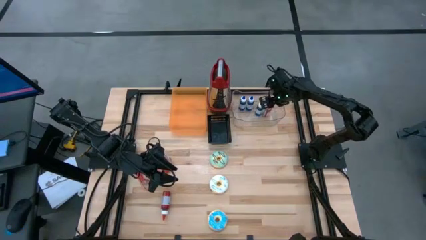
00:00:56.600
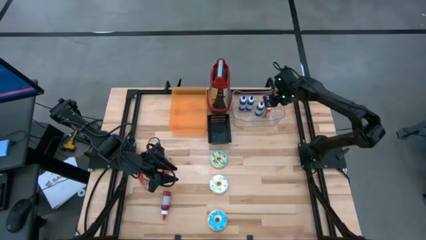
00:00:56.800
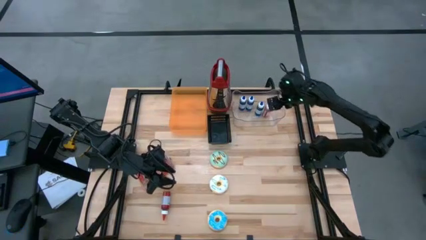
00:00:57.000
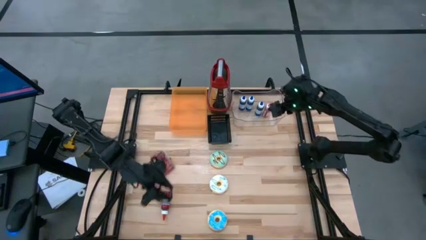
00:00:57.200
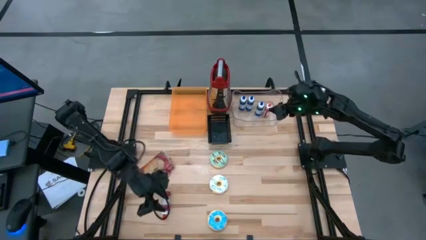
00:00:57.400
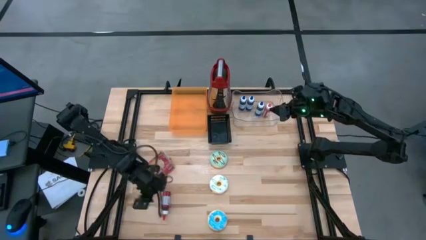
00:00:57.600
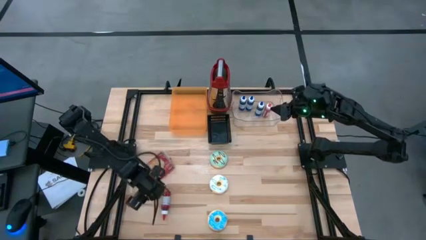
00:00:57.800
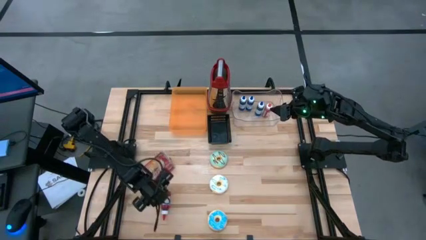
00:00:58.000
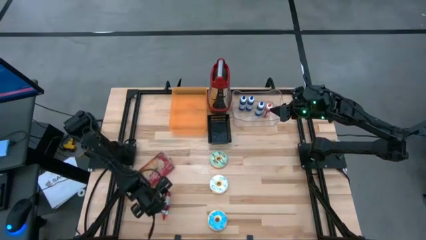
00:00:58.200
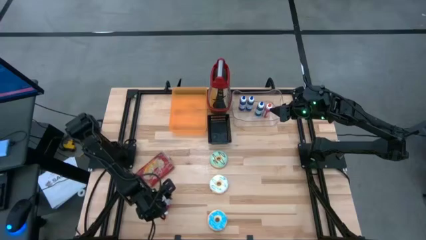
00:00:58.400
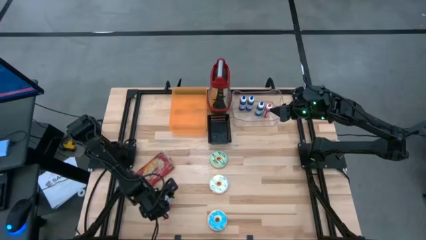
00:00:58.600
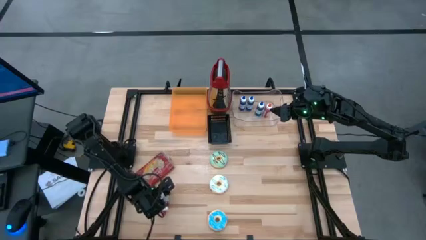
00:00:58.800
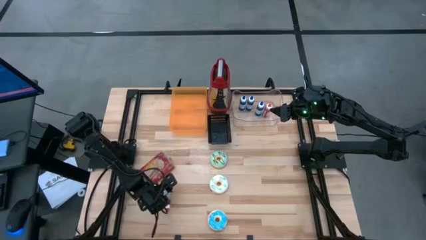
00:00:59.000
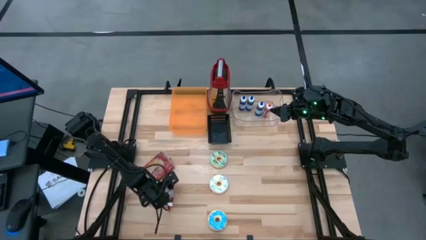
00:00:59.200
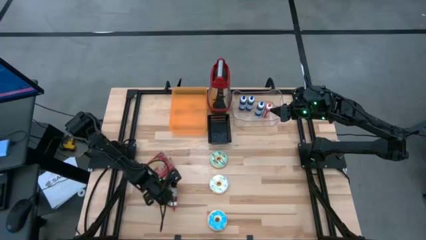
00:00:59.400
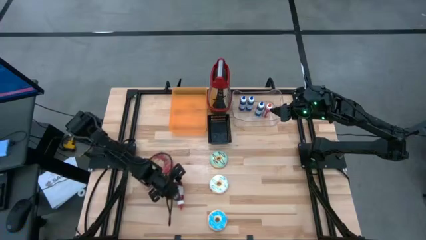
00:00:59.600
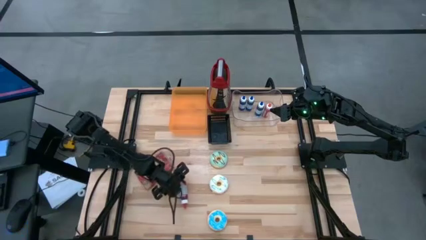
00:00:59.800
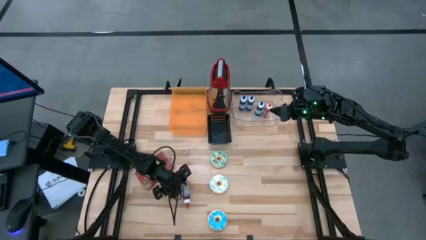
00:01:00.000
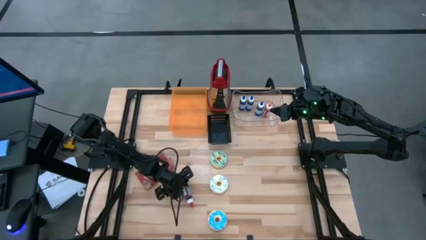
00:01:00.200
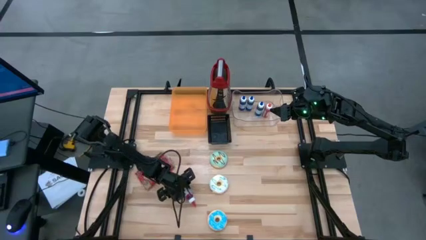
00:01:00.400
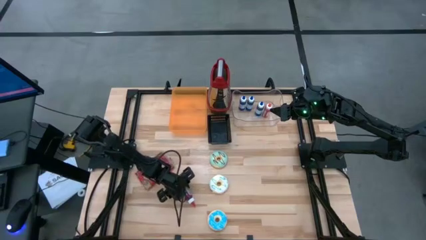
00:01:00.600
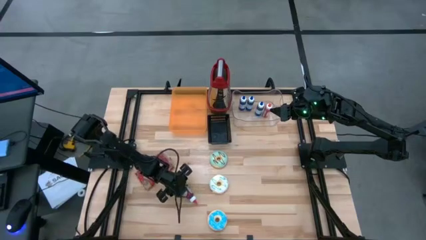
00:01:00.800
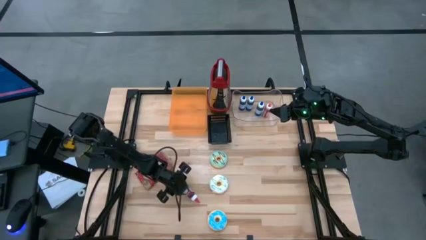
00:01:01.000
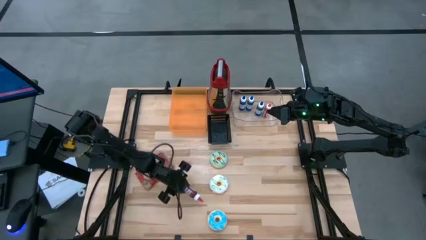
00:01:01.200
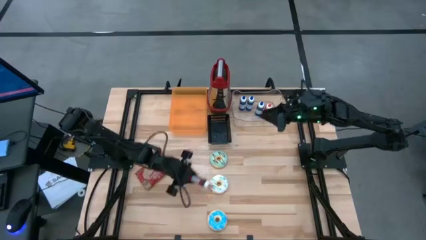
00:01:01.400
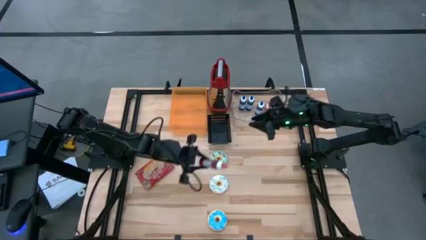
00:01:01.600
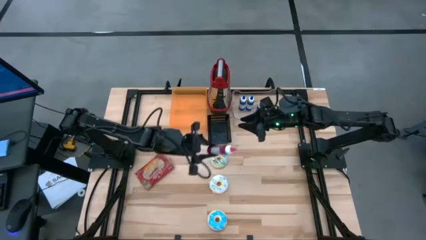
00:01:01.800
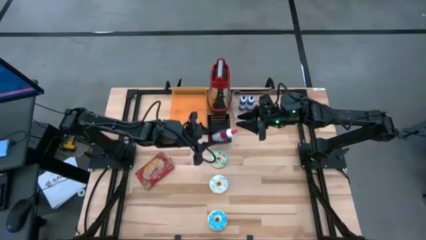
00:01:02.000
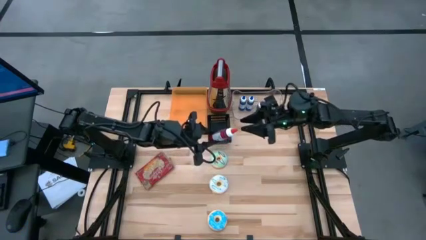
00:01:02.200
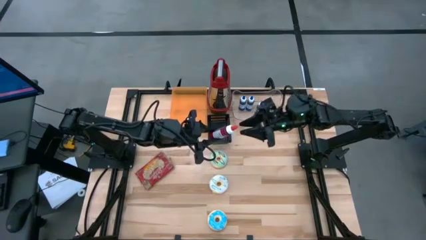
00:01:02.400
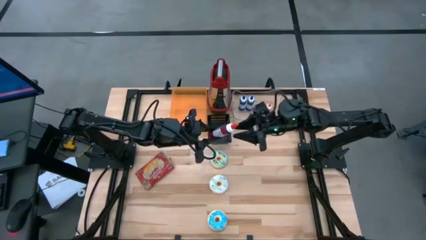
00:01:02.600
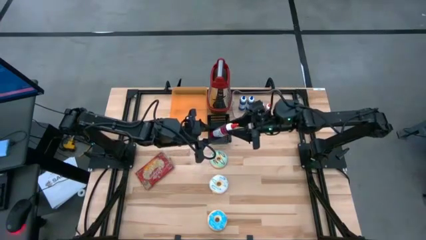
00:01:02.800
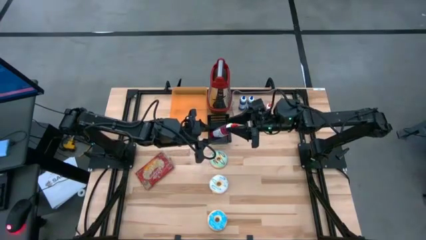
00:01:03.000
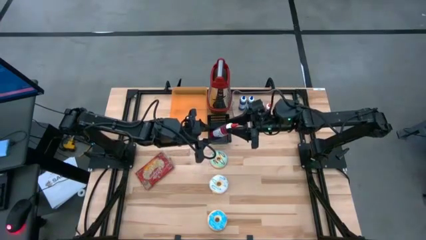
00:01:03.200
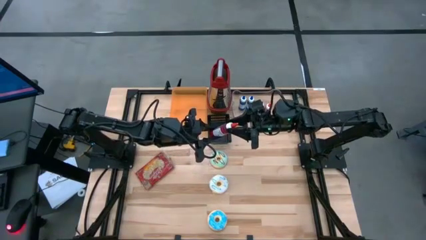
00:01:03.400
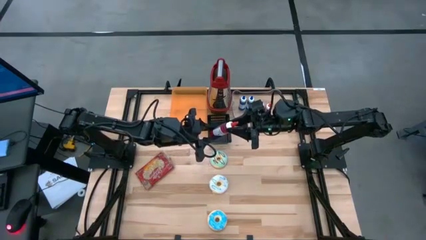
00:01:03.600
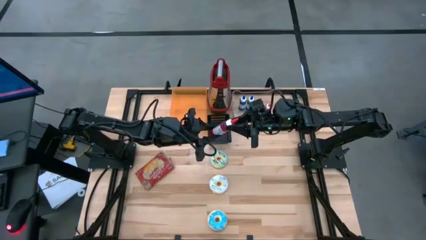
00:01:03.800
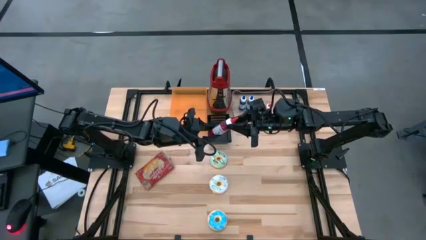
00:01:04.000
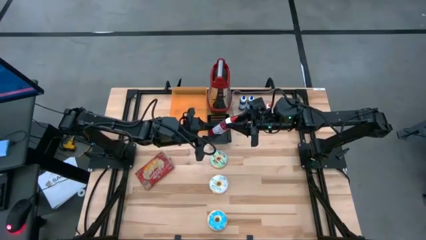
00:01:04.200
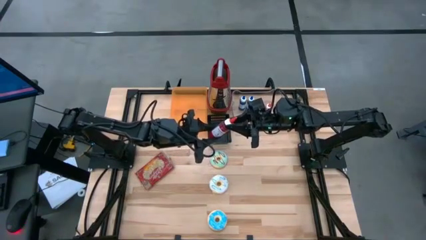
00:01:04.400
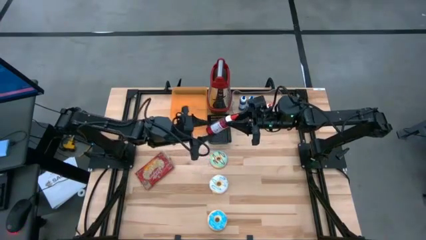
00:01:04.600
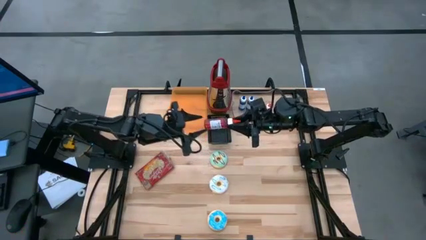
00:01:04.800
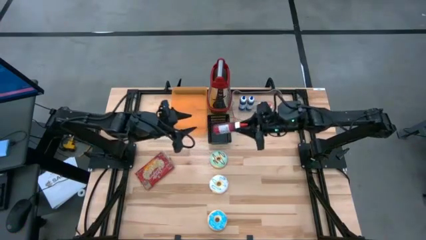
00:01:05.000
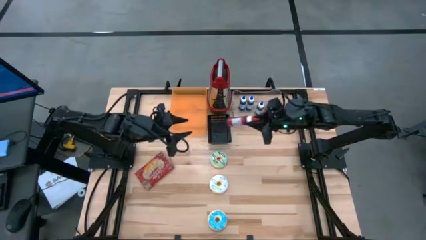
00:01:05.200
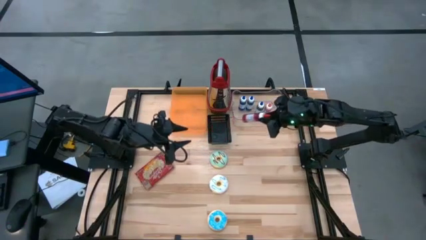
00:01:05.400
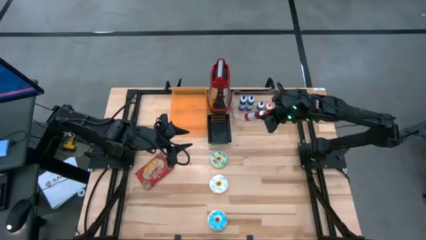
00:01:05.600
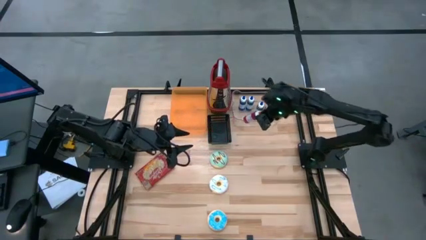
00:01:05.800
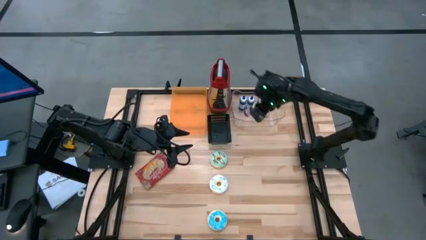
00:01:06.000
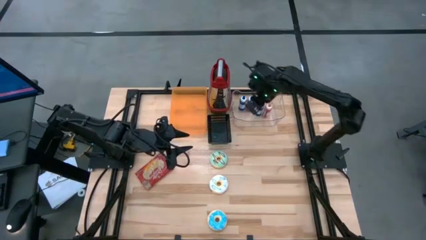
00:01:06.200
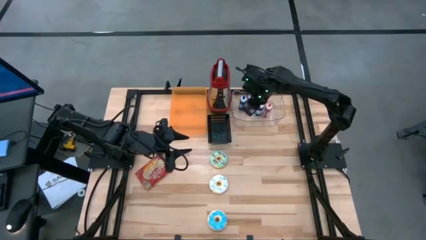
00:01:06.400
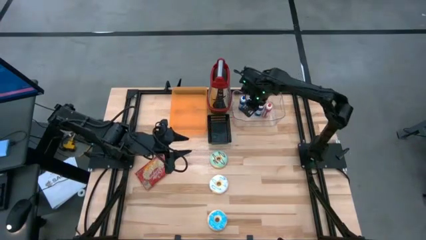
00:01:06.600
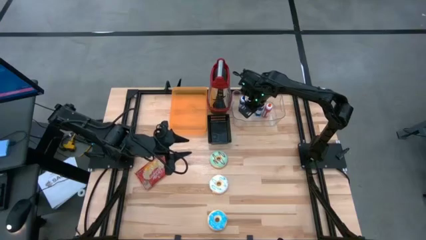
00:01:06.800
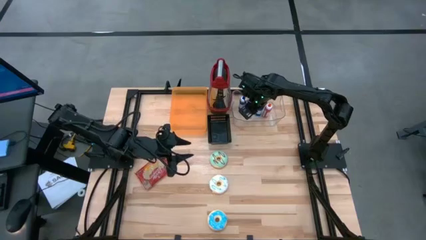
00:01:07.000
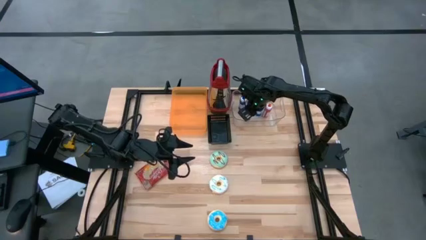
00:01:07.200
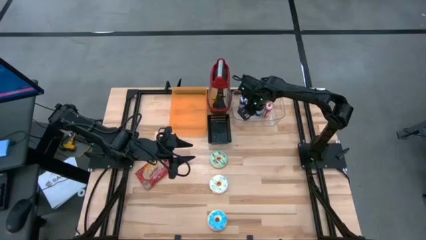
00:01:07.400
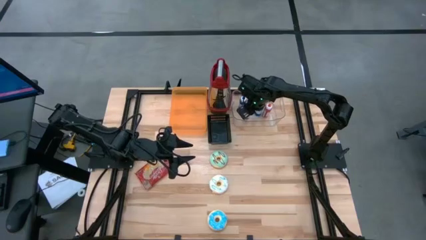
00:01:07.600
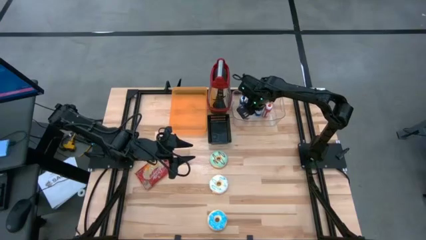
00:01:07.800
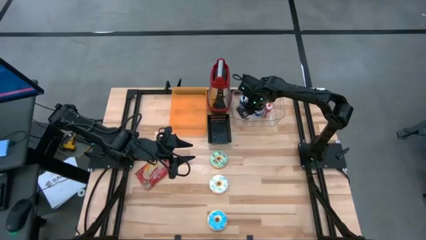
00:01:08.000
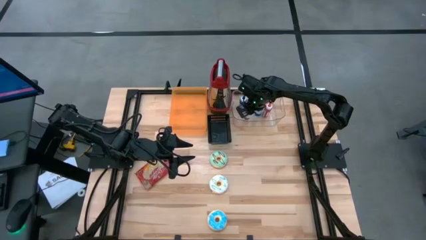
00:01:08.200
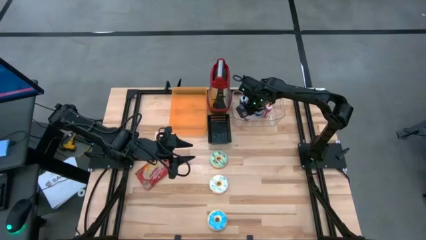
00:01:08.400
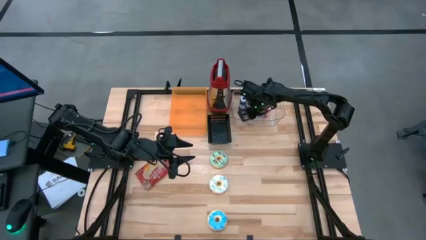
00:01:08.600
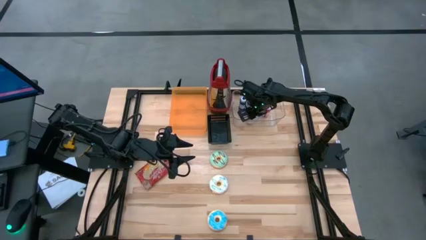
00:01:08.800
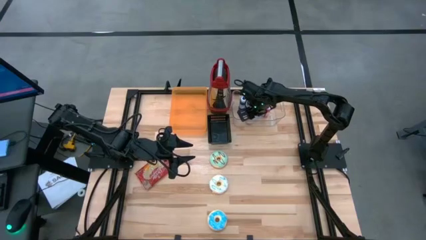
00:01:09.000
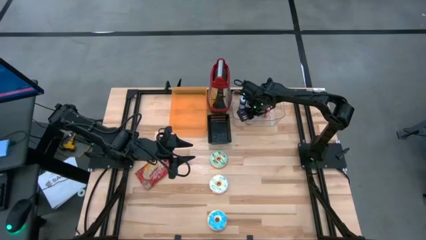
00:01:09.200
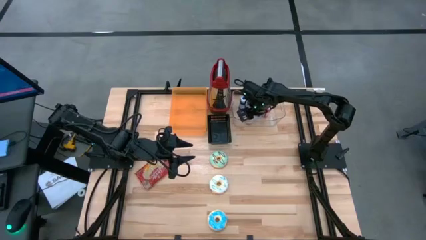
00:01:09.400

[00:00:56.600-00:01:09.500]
Put the red food coloring bottle into the transparent bin

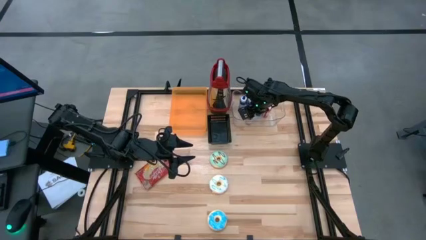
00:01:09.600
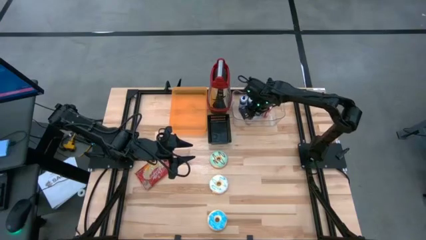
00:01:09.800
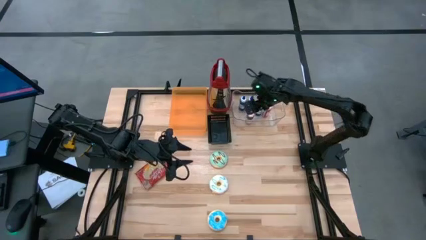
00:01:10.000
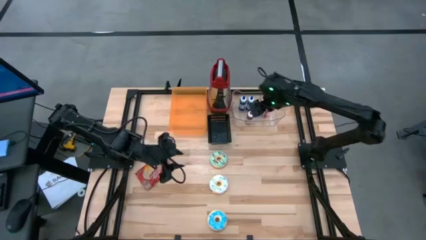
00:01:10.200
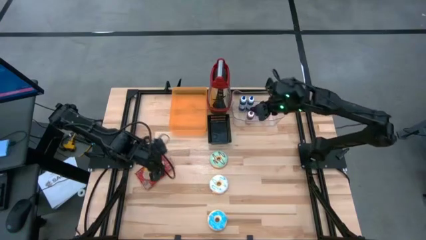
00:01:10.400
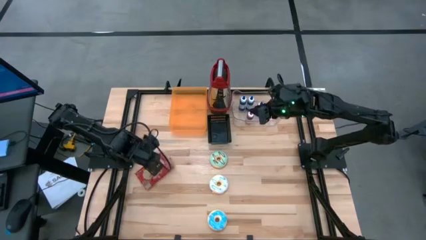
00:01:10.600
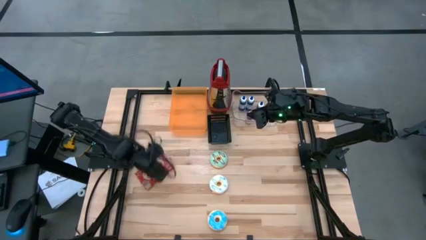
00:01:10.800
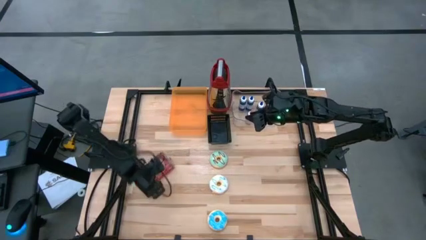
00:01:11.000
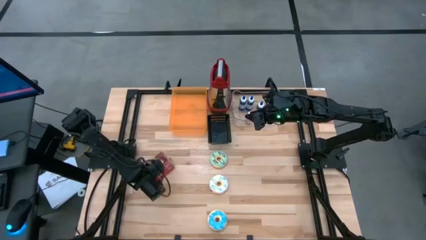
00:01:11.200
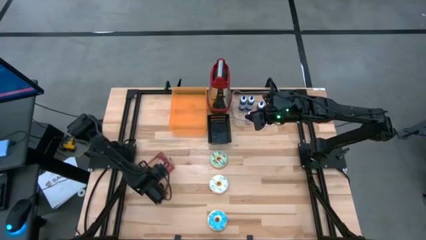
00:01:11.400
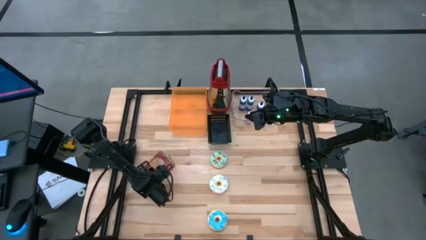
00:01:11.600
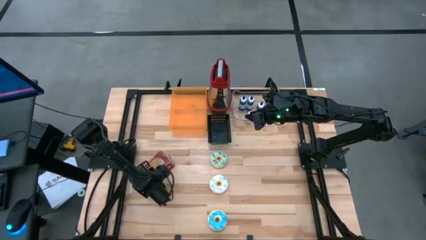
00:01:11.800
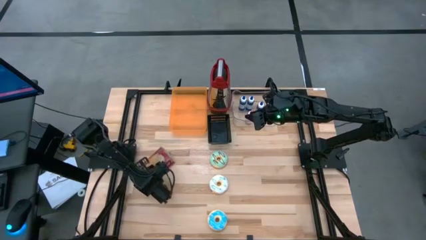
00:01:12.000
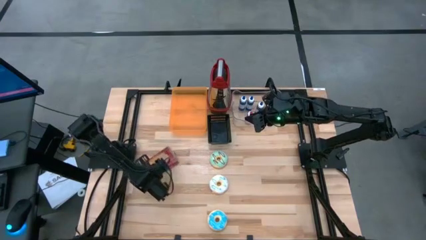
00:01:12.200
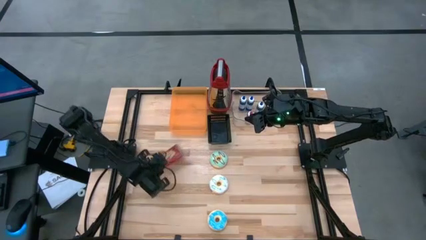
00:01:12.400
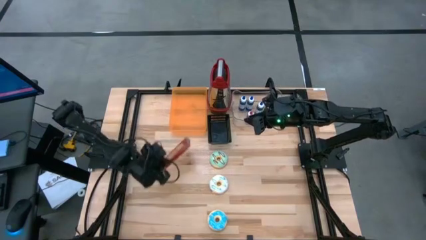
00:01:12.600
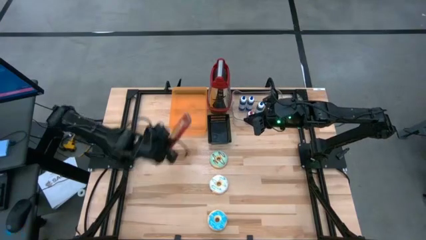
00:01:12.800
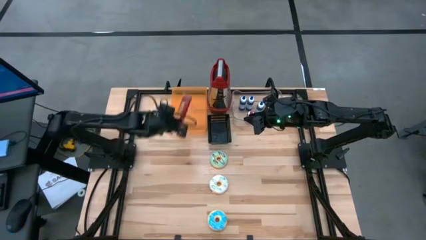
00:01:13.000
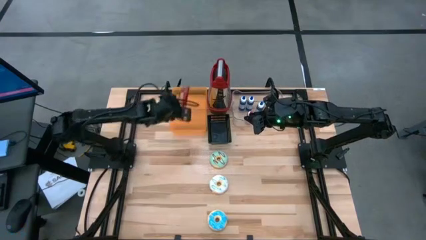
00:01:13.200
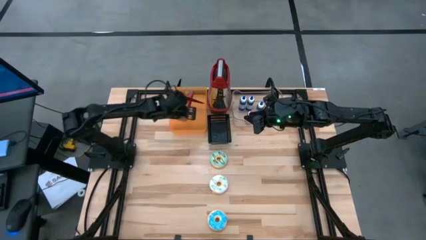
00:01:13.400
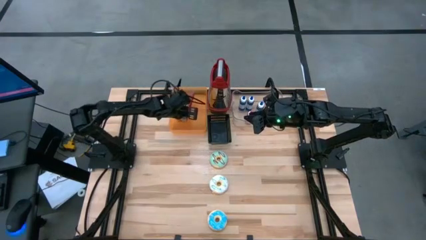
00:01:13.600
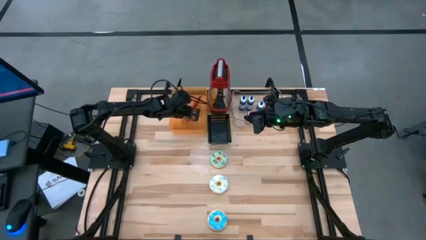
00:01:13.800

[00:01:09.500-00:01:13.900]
Put the popcorn bag into the orange bin
